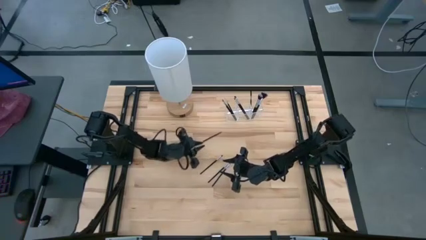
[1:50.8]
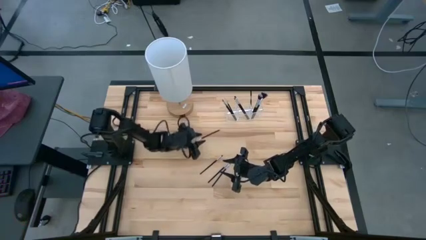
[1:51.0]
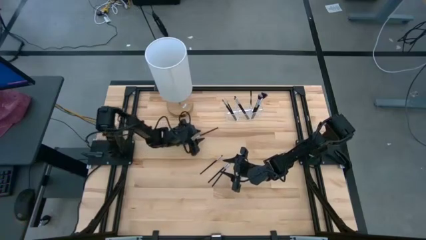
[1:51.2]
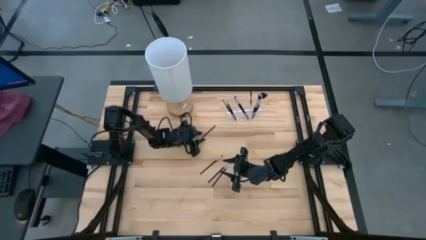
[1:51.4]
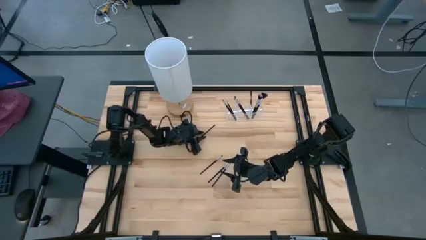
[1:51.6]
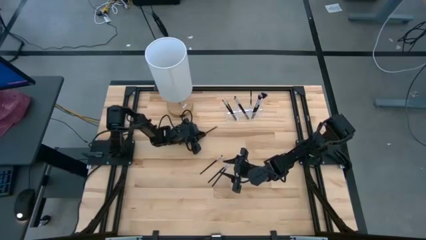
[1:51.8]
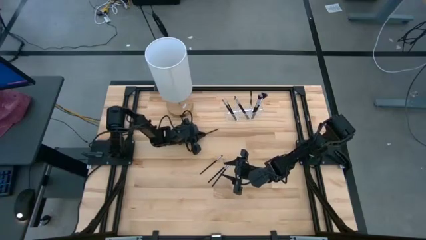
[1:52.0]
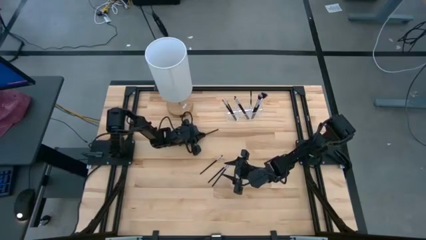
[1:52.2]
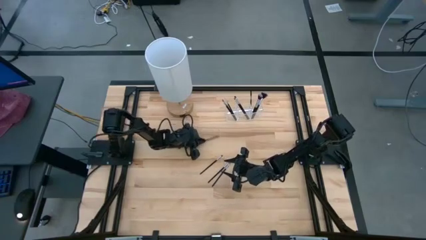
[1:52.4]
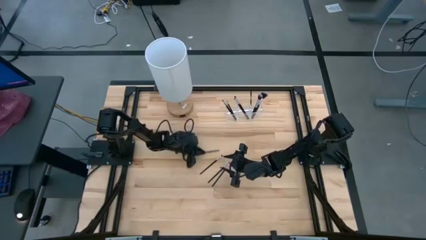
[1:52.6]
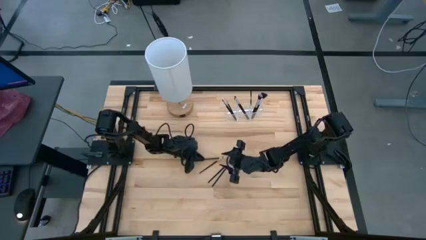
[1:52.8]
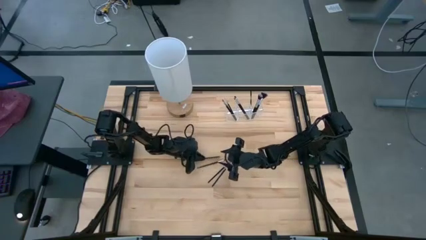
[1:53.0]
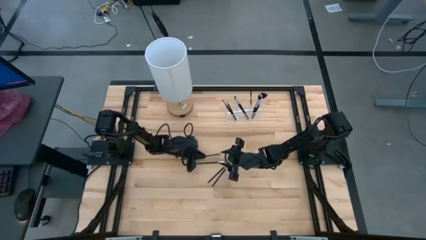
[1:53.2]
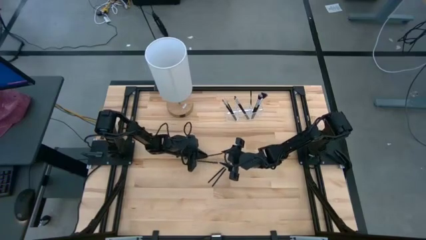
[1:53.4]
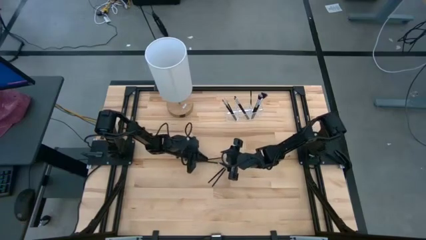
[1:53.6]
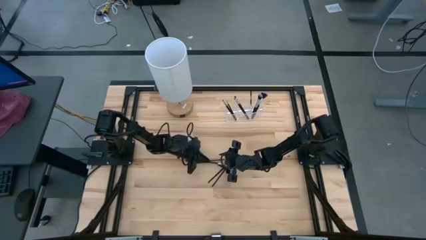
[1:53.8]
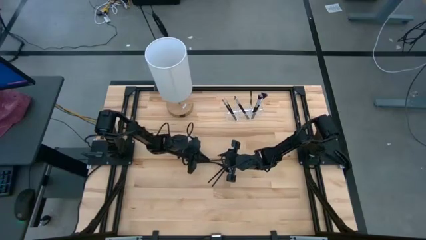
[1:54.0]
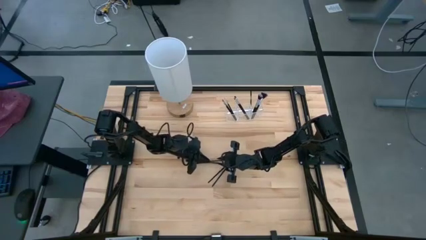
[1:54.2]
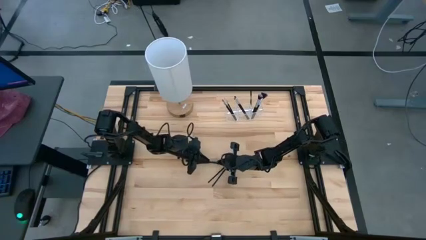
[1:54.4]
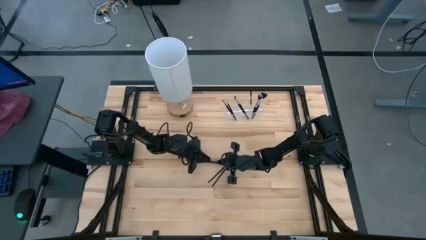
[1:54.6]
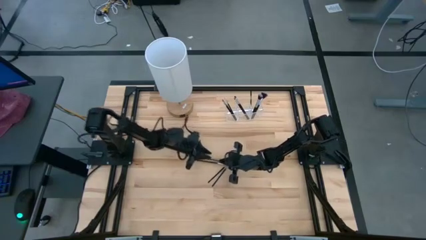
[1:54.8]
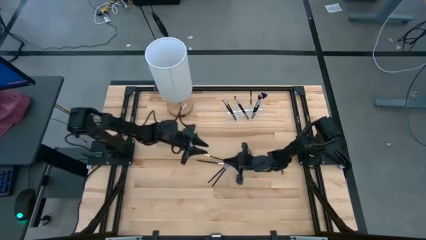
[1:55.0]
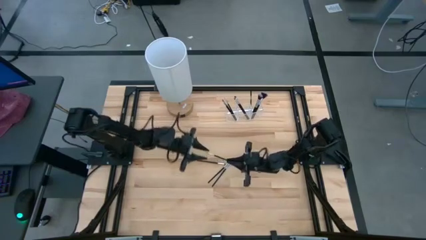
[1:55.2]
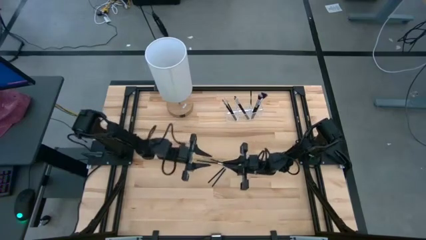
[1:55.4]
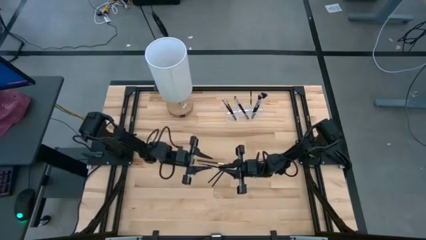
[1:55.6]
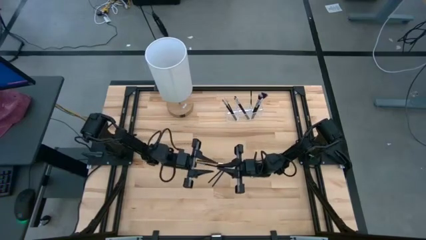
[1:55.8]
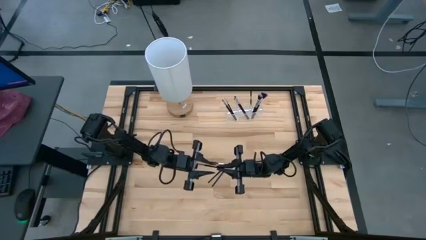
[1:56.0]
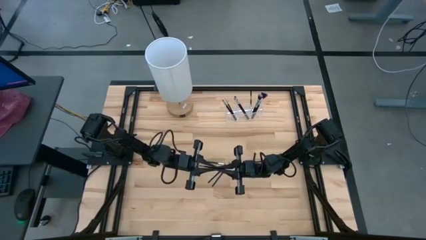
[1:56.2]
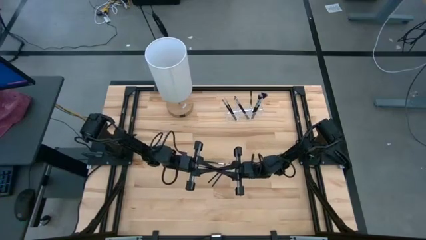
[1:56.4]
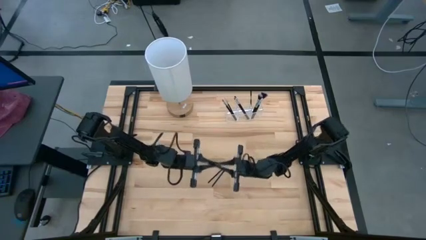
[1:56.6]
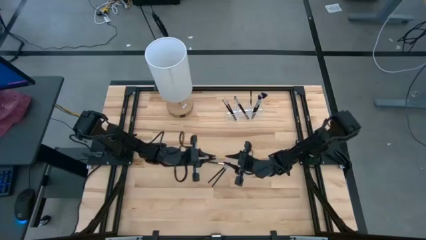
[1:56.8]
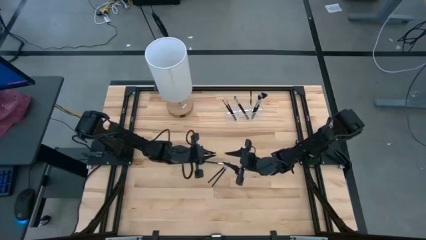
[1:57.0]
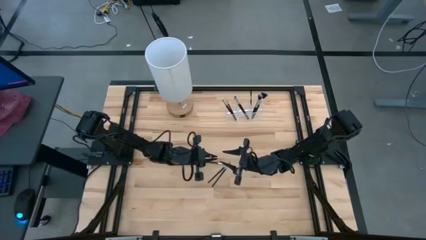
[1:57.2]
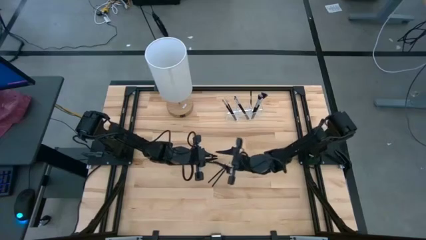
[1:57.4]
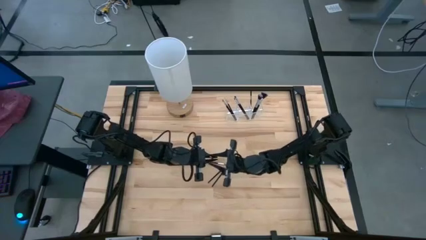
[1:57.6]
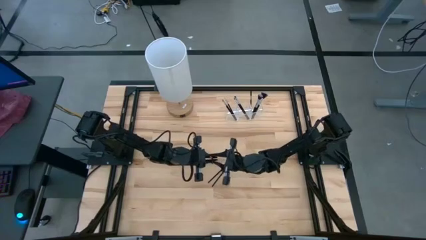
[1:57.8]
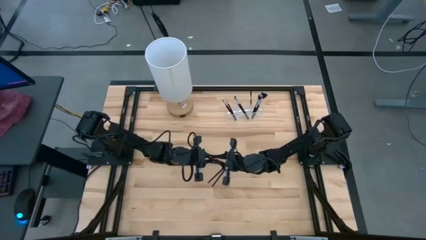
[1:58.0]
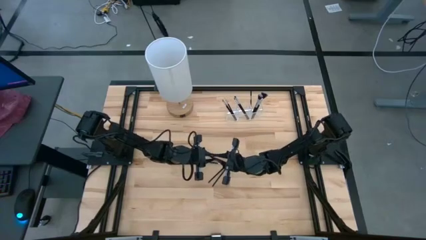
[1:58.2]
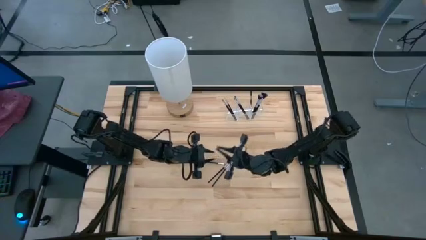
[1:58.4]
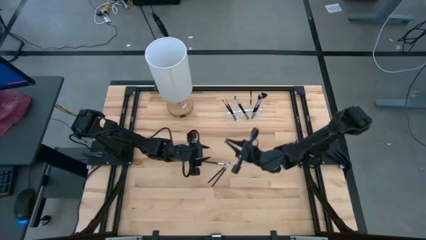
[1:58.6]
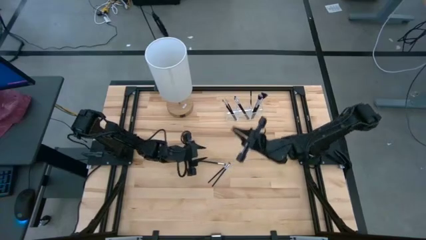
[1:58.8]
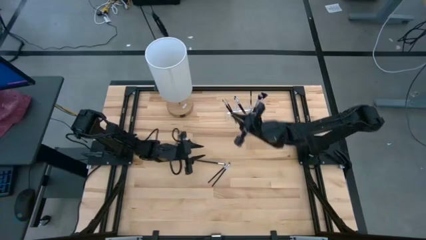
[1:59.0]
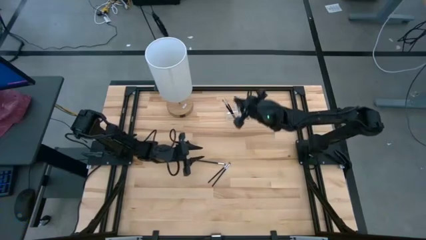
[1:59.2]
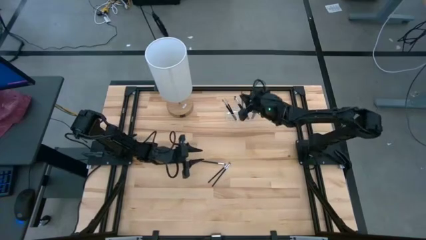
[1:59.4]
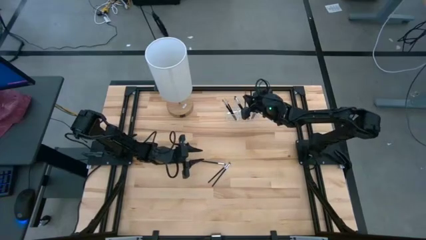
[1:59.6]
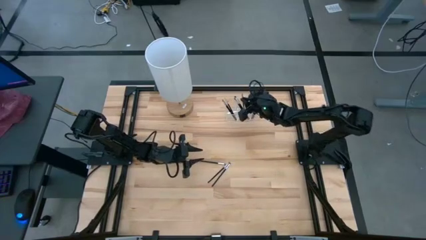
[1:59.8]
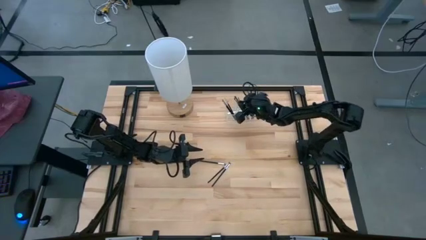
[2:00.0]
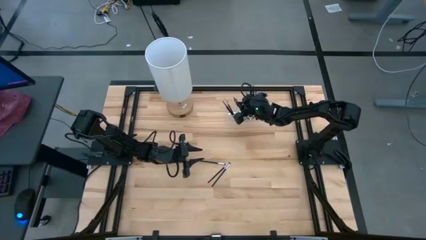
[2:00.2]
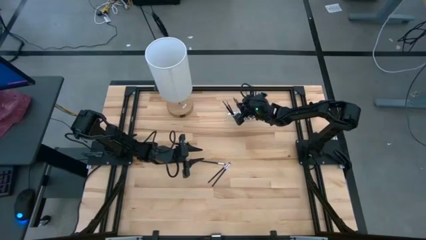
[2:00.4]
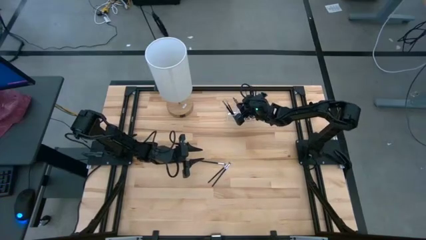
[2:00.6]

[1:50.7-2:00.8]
Task: Sort items
Put the eyeshadow brush into the transparent organizer

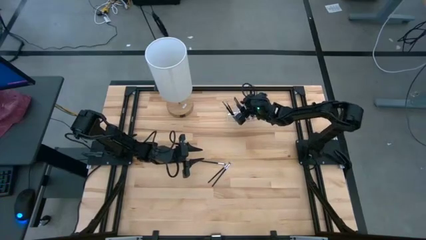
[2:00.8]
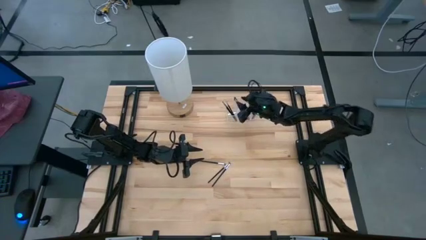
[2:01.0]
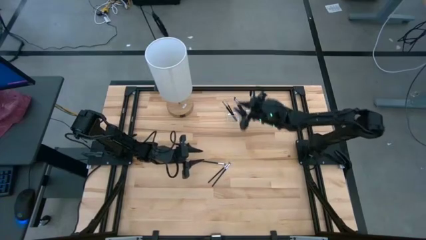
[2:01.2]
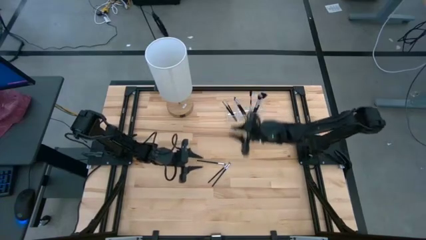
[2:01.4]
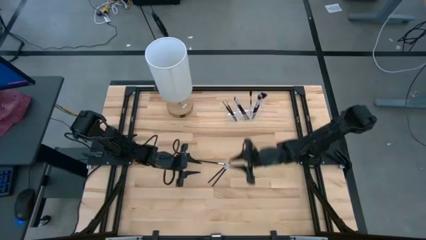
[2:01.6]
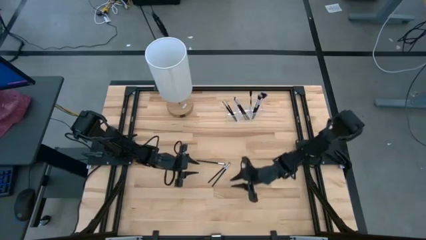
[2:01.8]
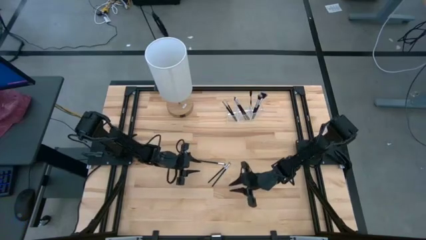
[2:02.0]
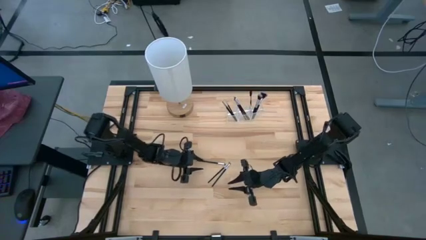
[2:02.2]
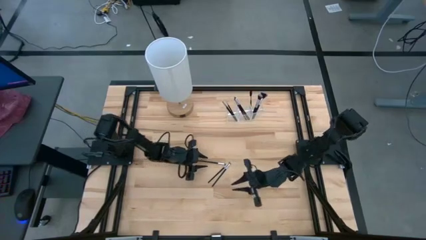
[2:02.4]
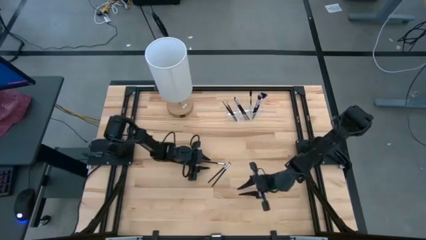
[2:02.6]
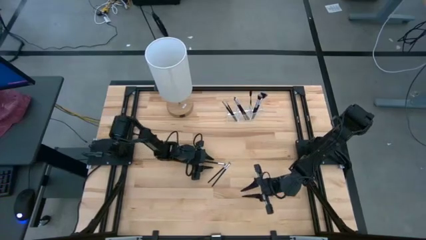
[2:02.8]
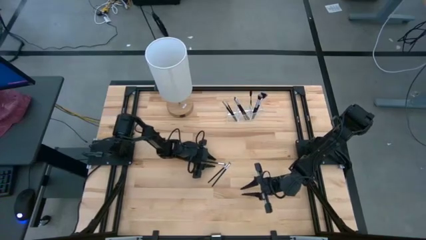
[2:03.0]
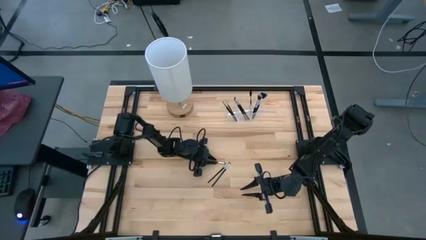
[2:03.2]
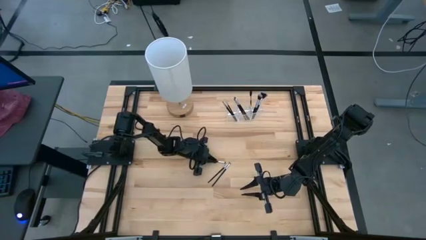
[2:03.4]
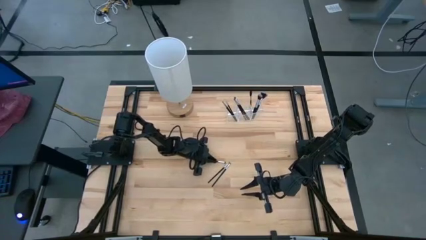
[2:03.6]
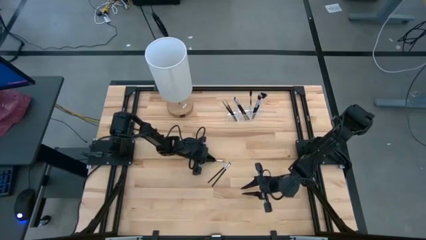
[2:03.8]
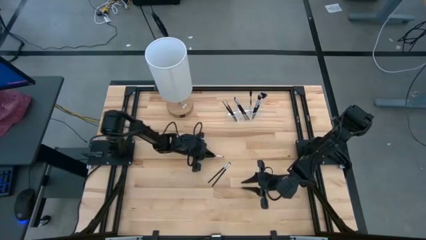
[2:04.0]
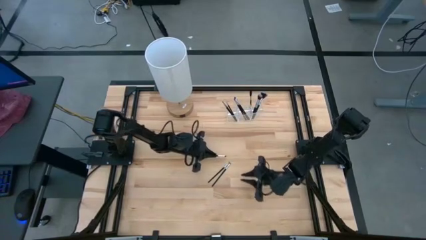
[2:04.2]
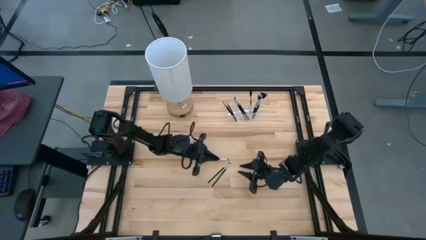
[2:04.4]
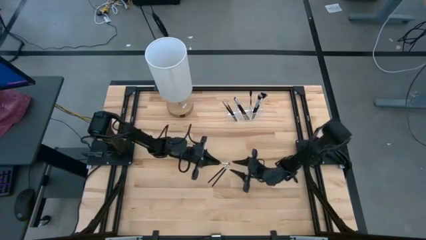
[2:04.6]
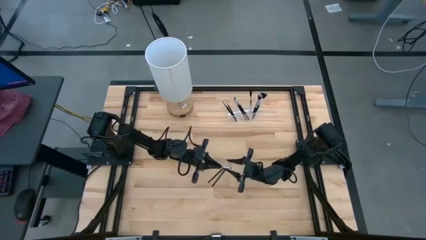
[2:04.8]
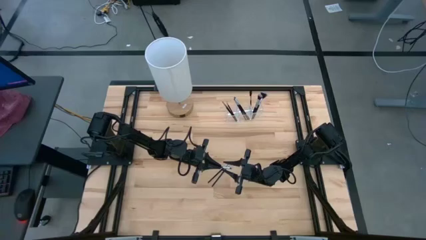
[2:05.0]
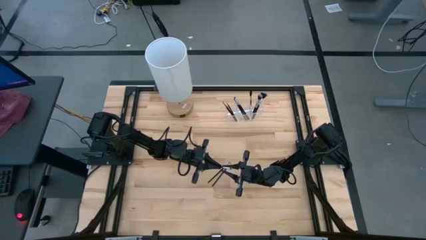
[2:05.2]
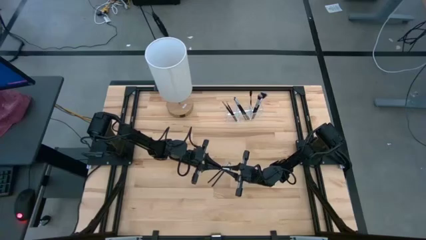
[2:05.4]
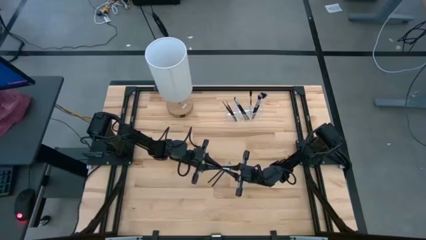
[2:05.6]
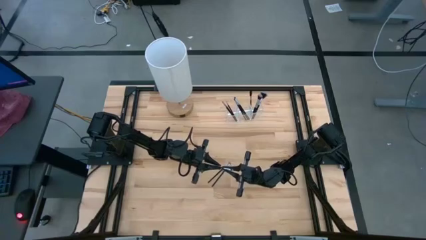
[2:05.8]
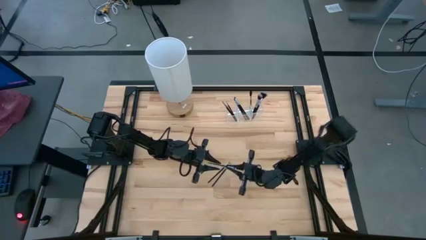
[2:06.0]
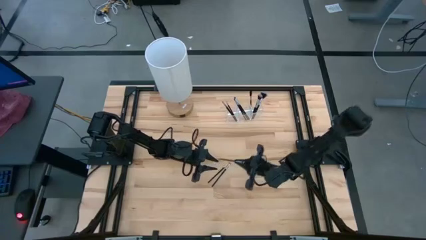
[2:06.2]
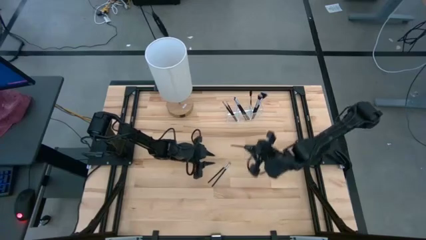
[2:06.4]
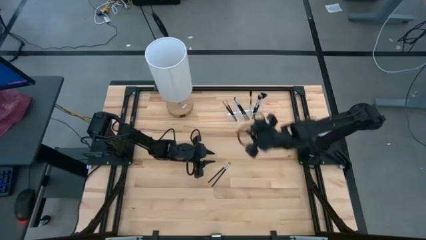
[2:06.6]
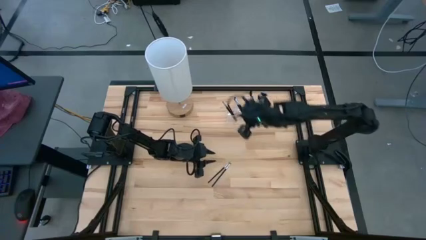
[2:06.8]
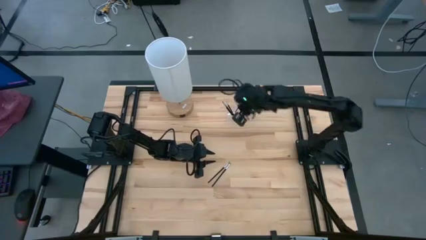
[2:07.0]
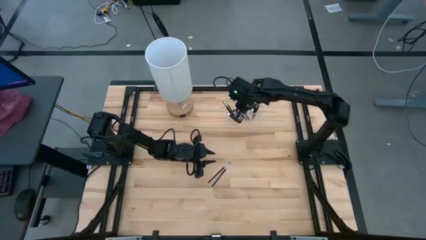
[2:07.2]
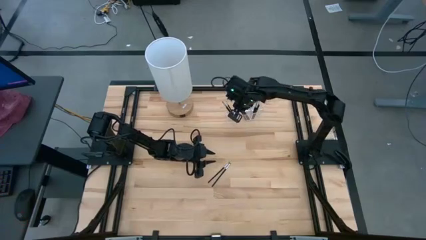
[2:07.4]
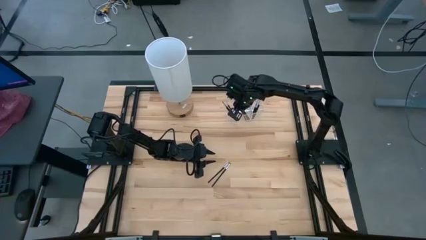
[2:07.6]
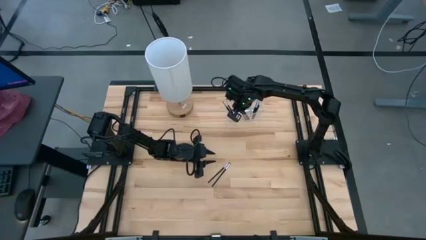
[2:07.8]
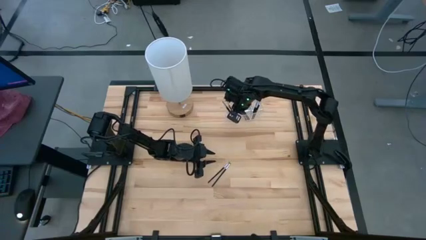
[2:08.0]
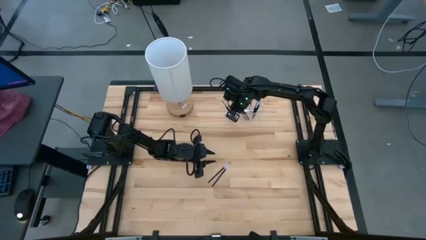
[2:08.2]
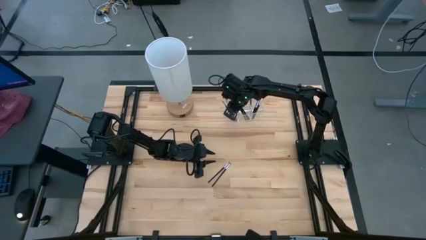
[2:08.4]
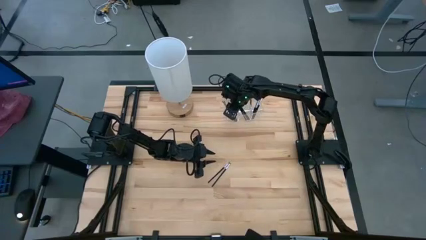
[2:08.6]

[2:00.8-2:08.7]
Put the eyeshadow brush into the transparent organizer
